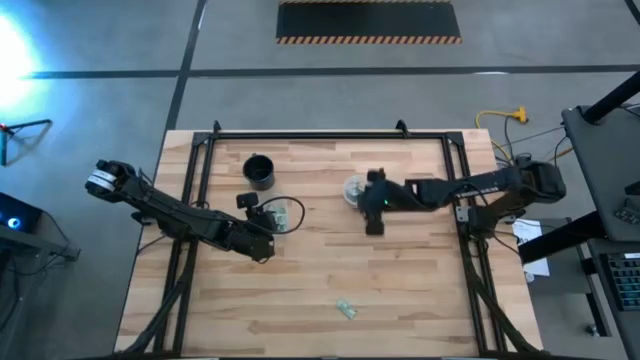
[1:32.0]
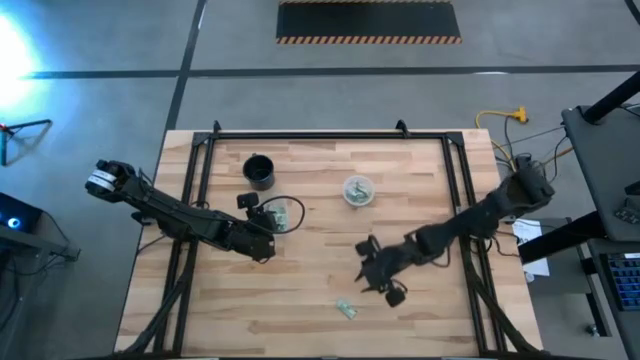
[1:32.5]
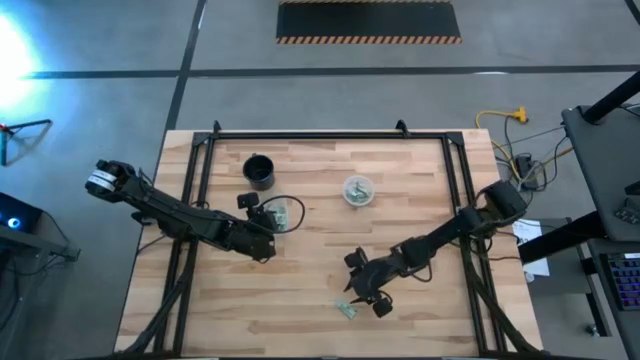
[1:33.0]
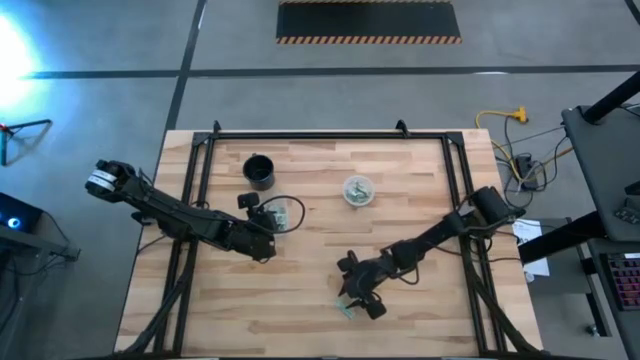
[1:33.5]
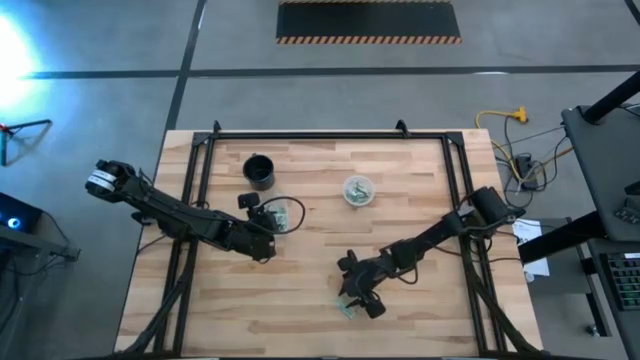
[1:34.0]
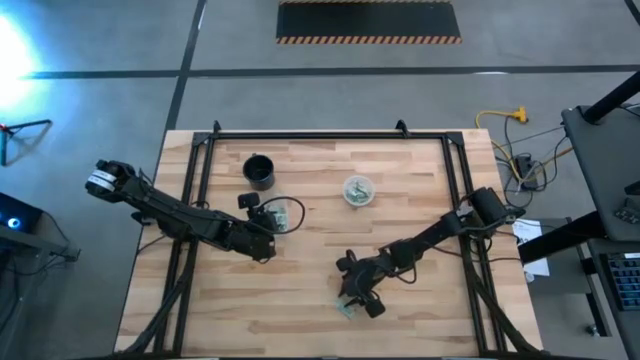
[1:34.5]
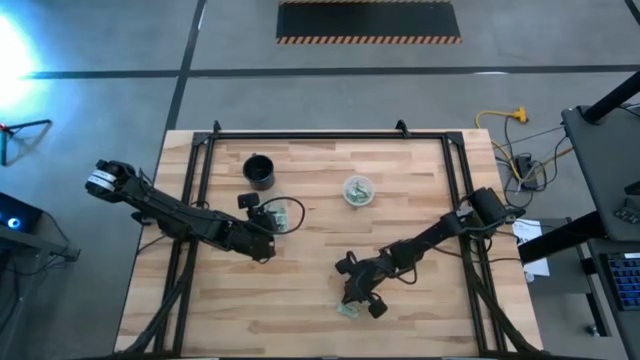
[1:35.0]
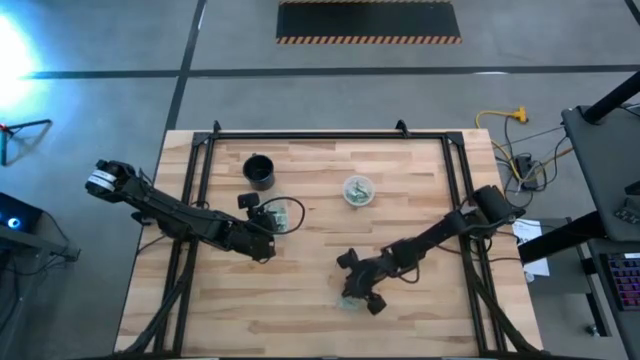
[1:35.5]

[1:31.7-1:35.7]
Task: Pick and place items into bin
Put the stevia packet into the right transparent bin

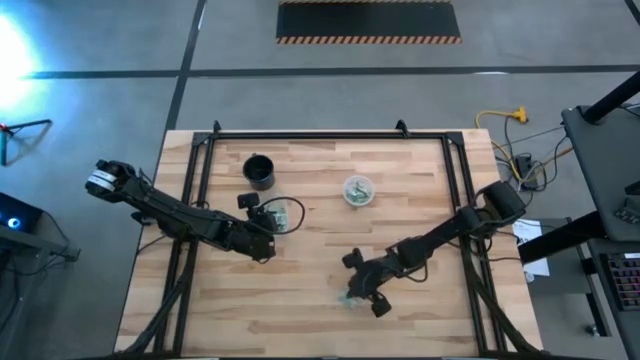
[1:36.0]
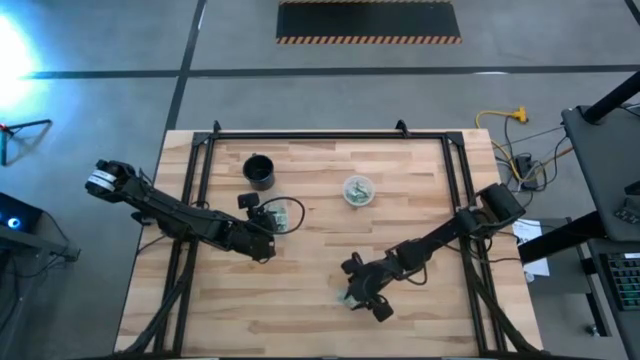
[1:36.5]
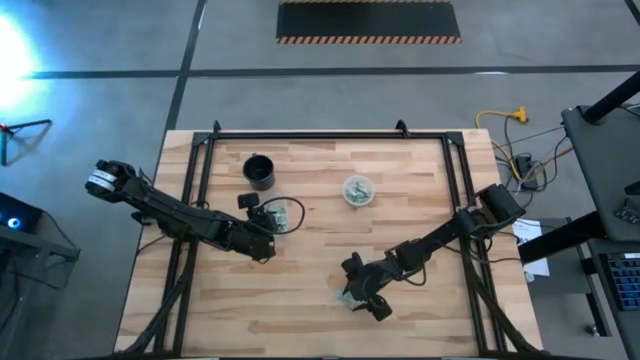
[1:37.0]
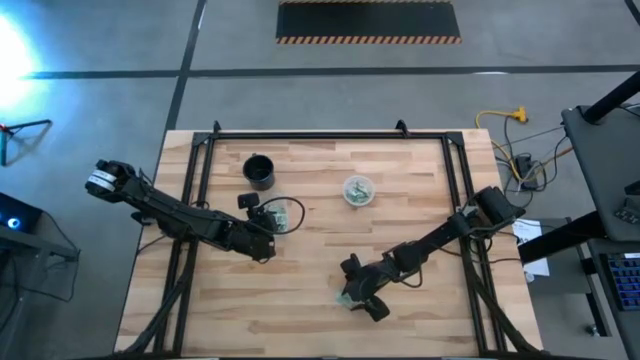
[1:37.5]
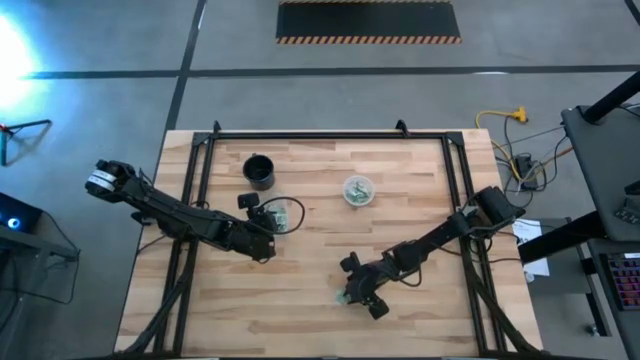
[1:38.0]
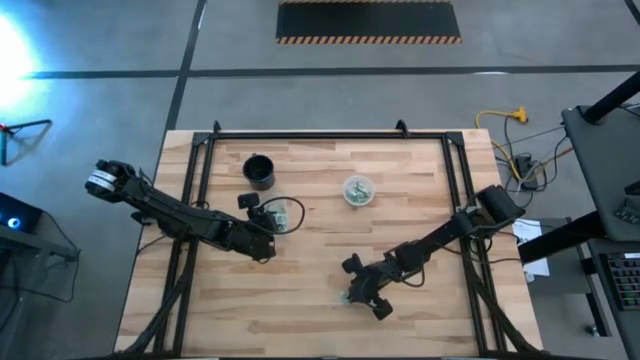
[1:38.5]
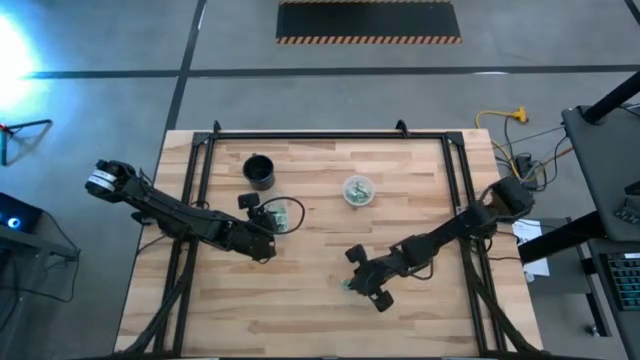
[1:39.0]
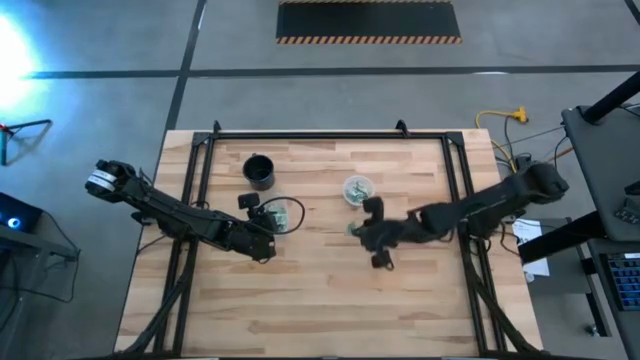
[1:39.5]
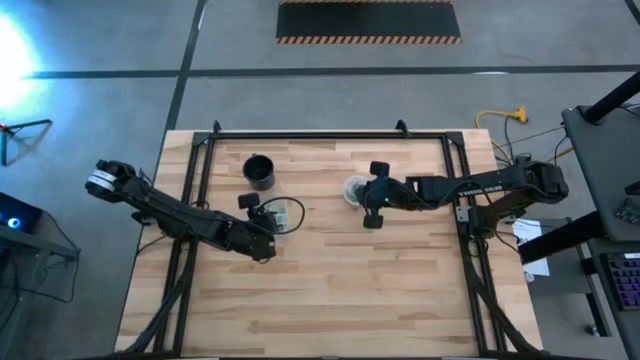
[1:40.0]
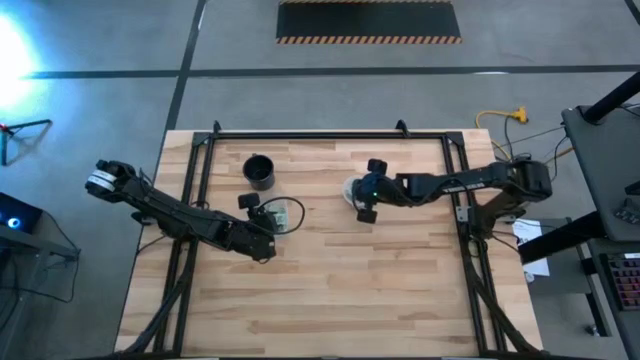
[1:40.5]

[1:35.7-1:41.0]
Put the stevia packet into the right transparent bin

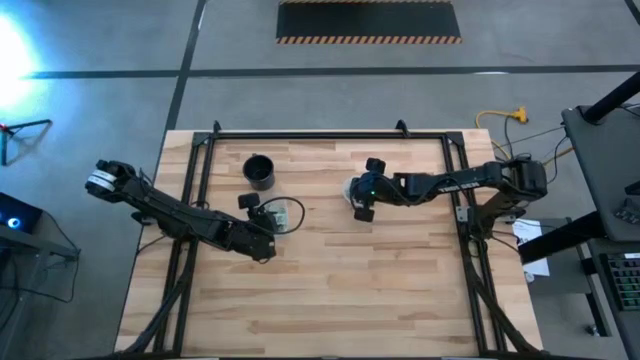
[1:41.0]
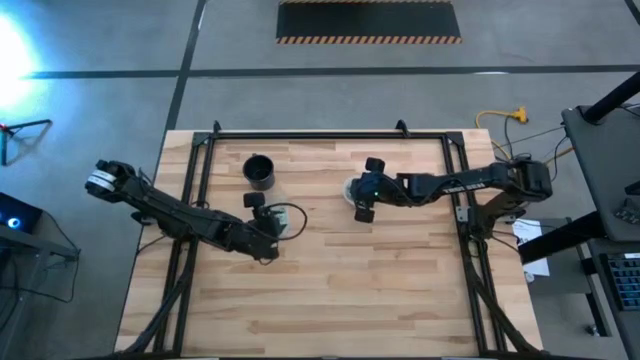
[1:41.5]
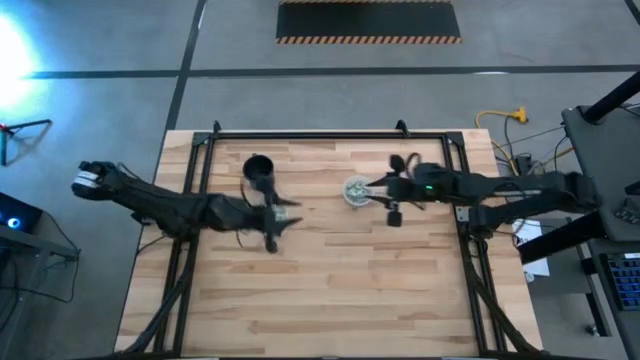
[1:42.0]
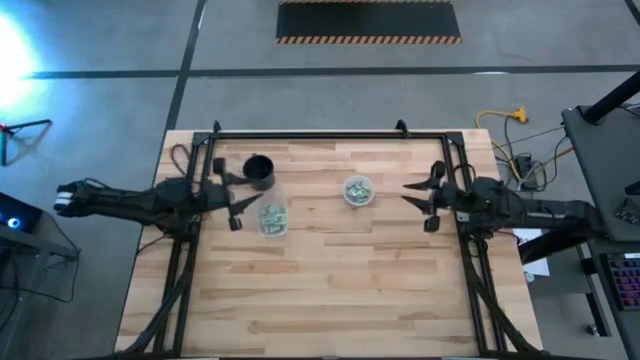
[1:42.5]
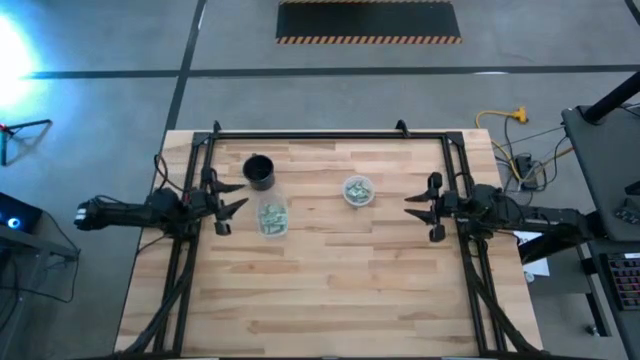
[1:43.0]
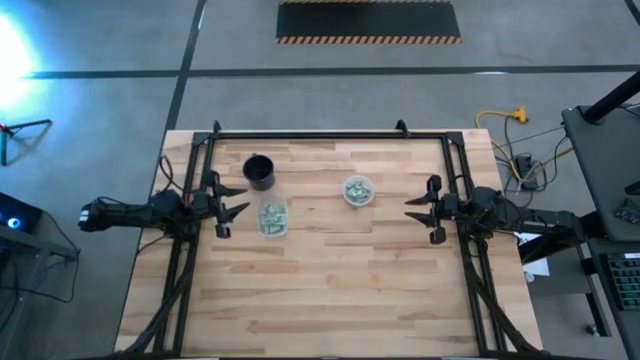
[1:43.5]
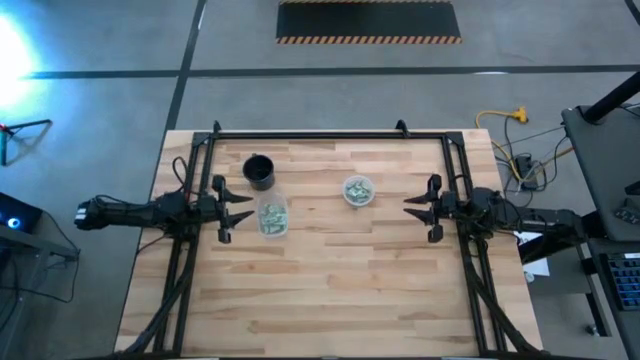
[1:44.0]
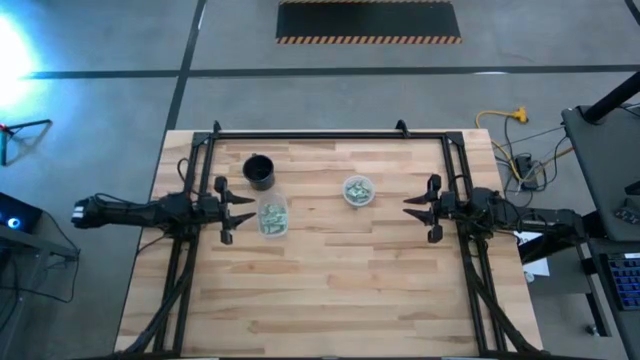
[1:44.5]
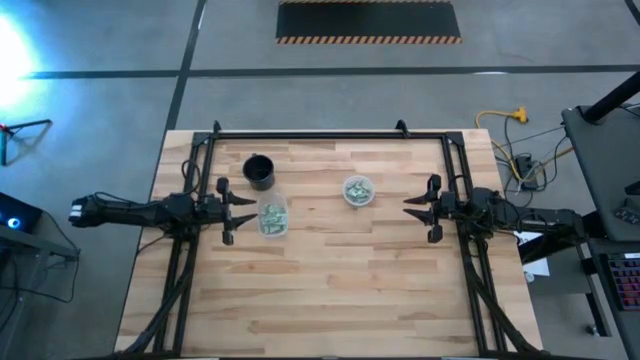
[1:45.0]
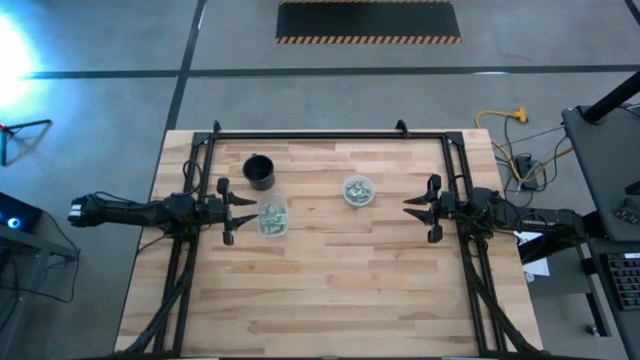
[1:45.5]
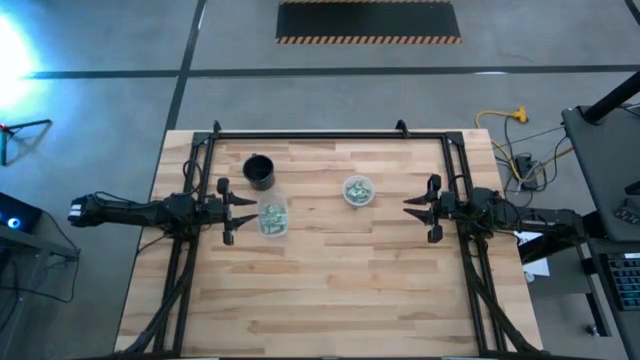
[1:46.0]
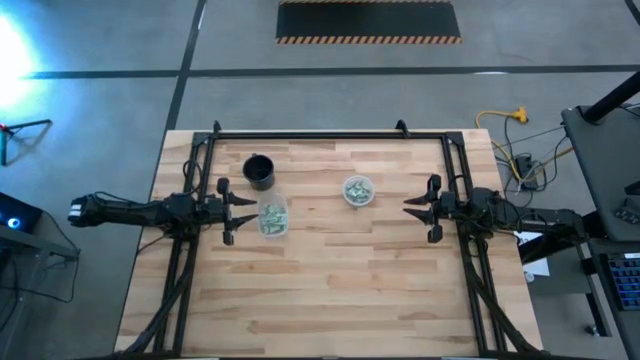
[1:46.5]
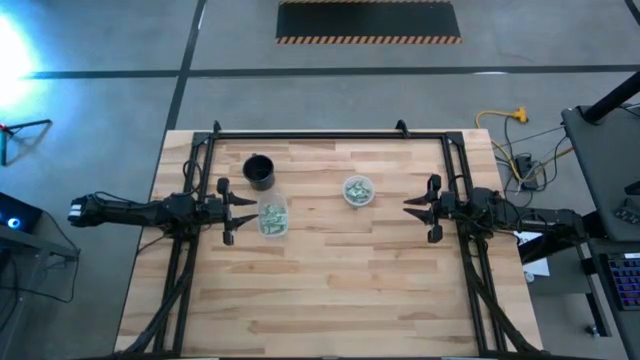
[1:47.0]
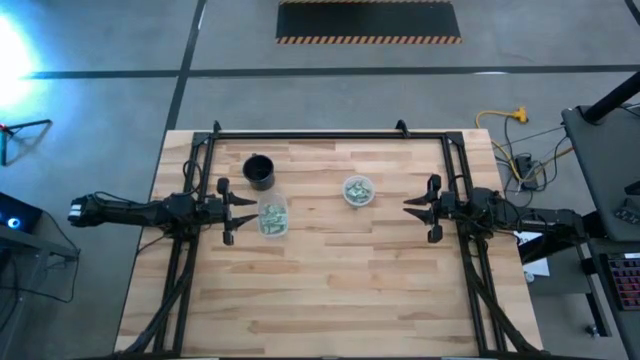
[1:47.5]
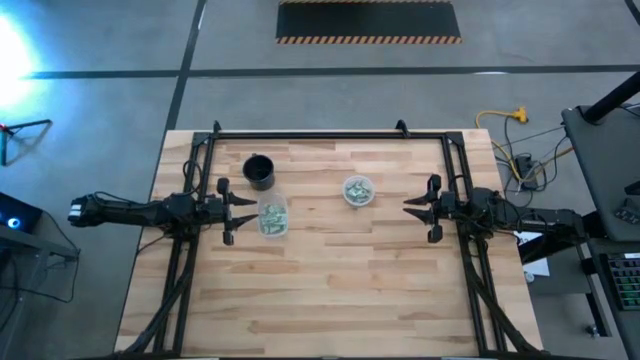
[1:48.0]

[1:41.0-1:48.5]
Return to Home Position

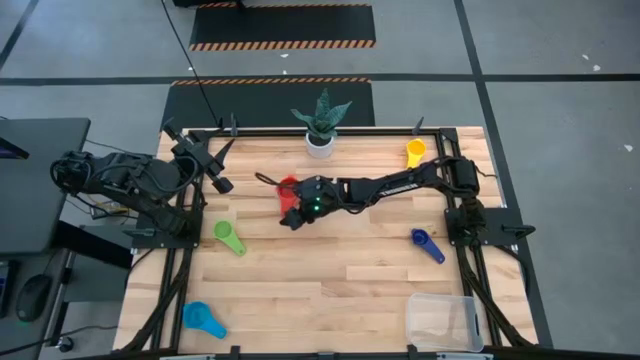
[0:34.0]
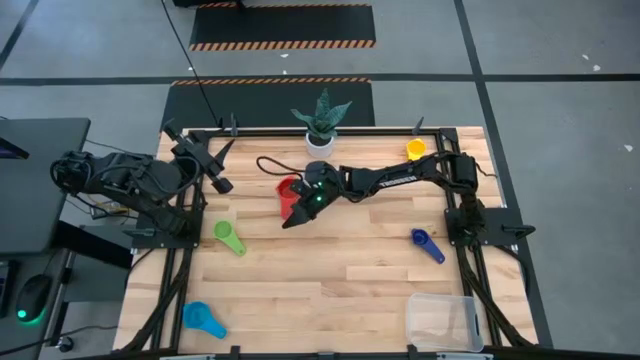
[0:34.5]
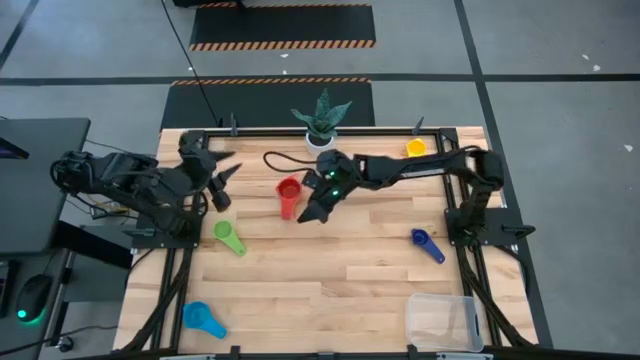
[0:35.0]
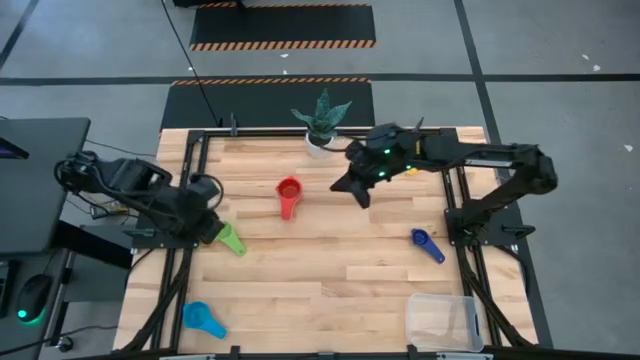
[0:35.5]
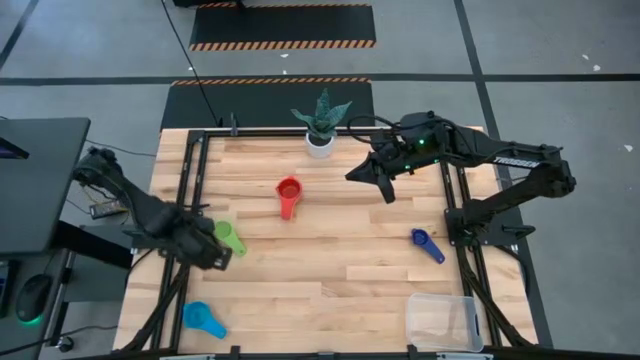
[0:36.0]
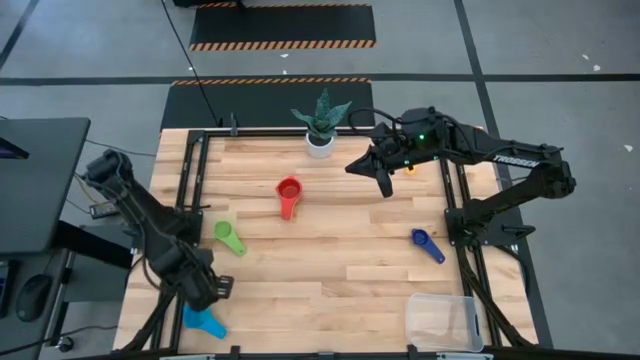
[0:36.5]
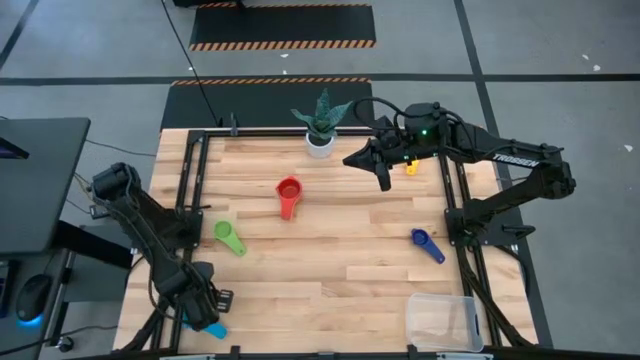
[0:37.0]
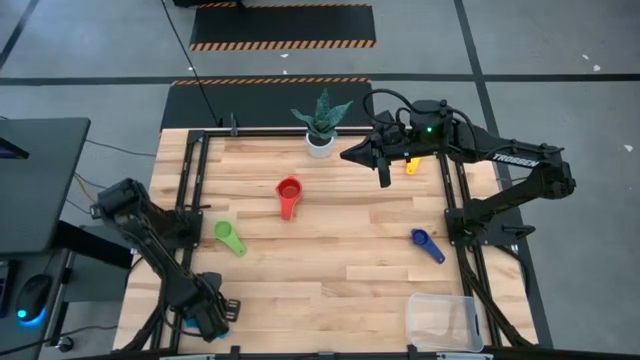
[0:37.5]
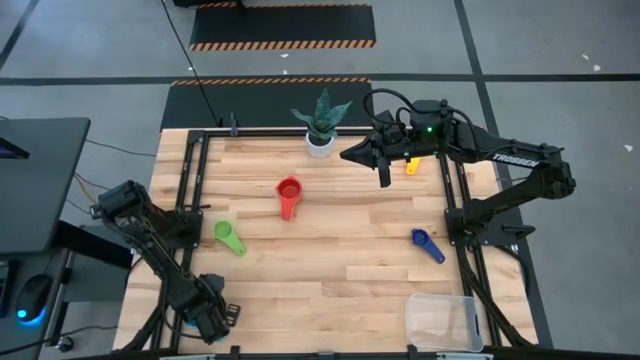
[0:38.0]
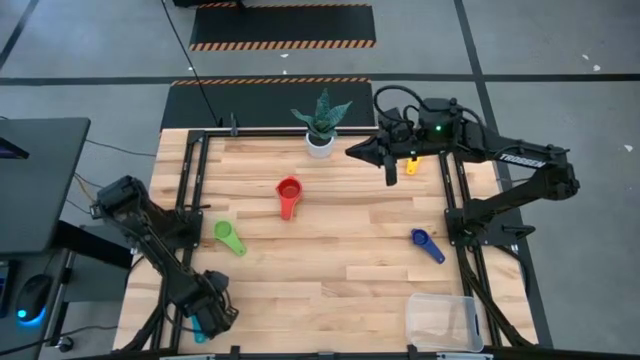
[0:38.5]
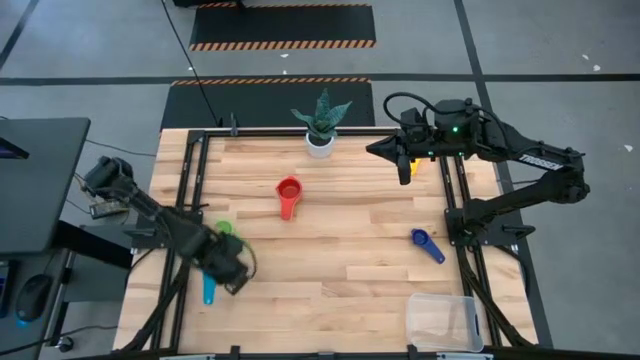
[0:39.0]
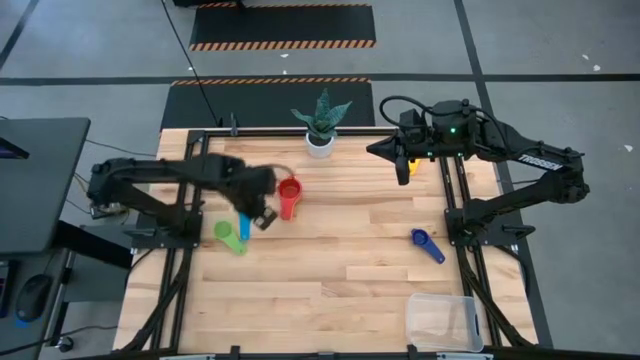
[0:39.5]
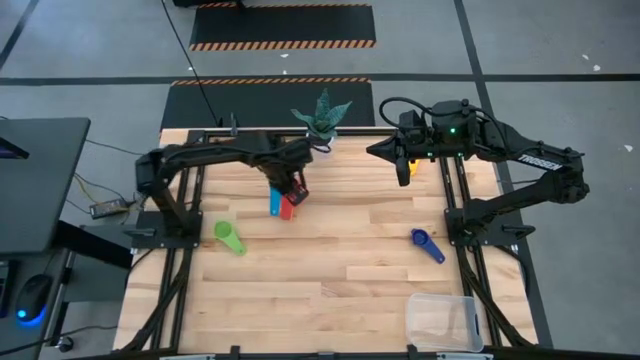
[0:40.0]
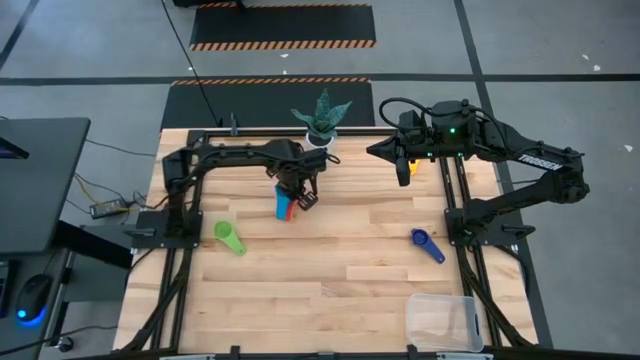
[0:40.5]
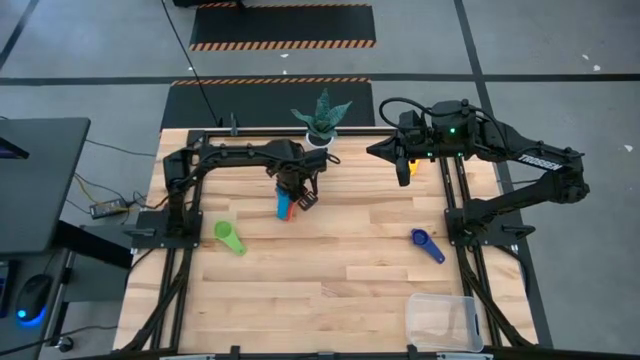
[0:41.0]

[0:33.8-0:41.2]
Task: Nest measuring cups in basket
Stack the light blue measuring cup on top of the red measuring cup
